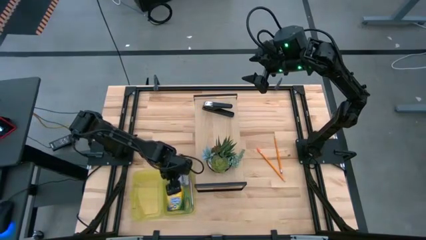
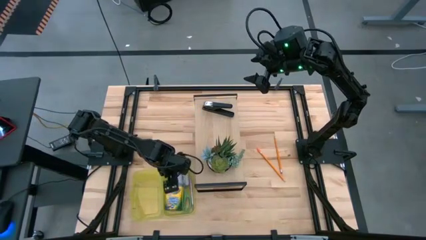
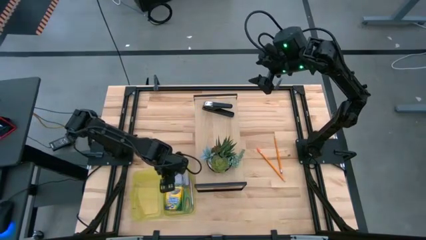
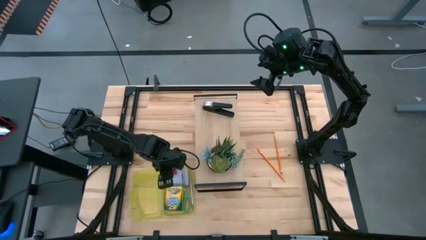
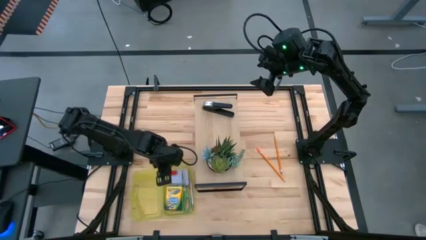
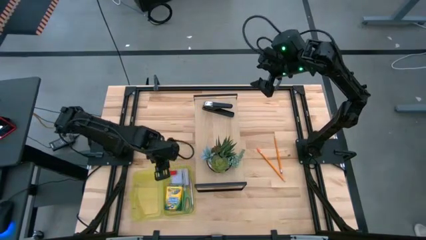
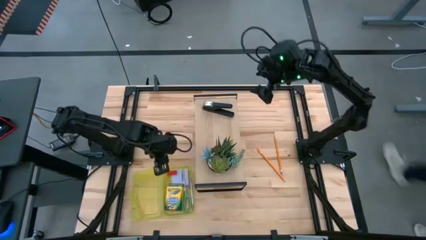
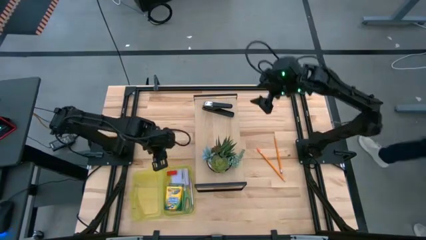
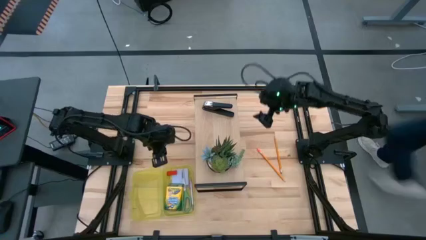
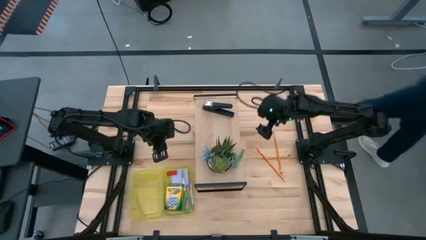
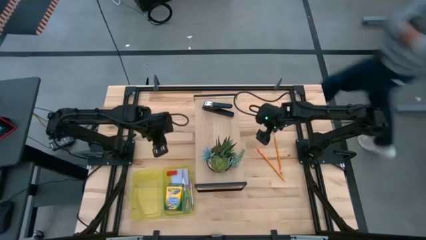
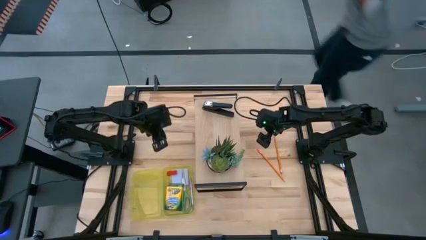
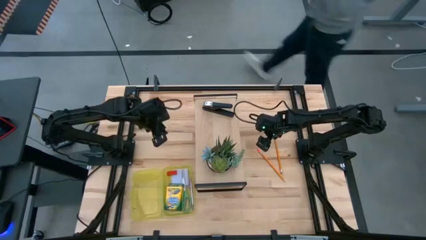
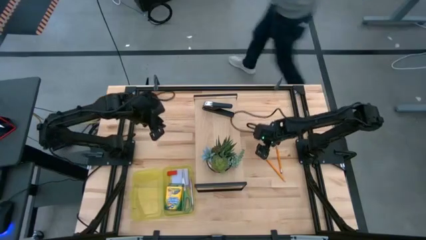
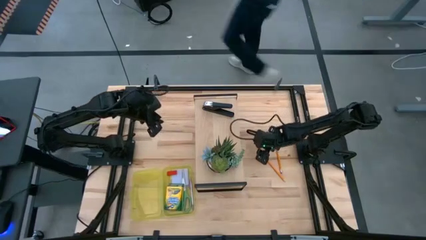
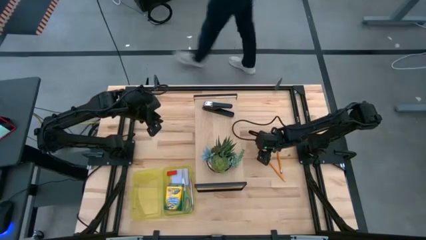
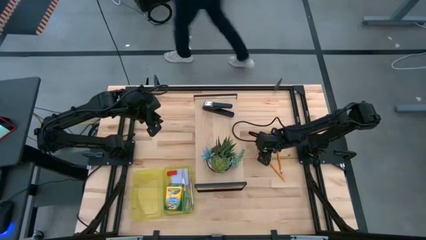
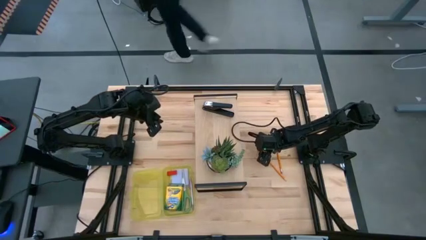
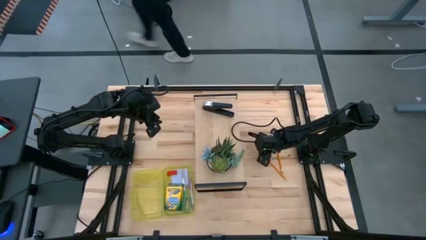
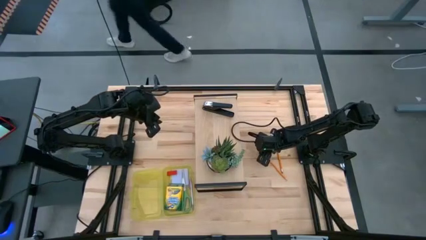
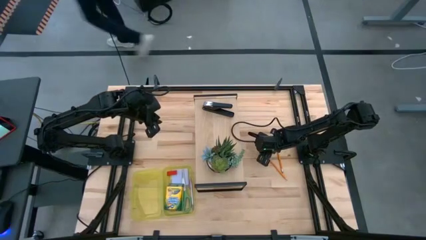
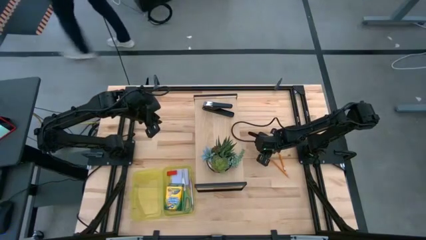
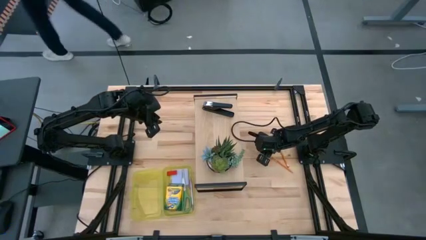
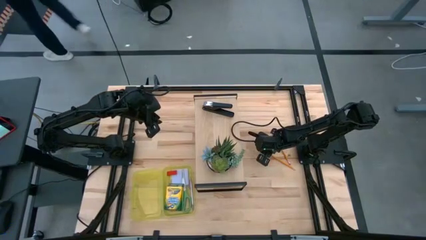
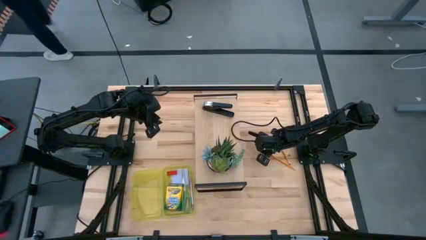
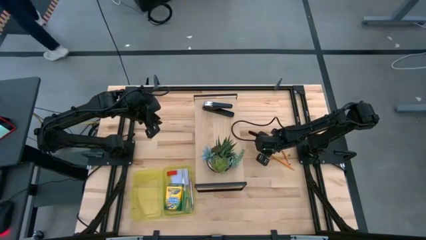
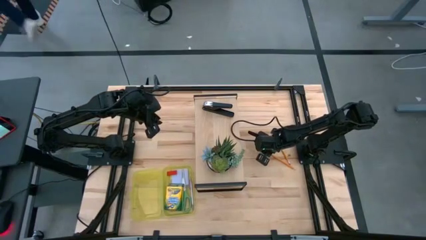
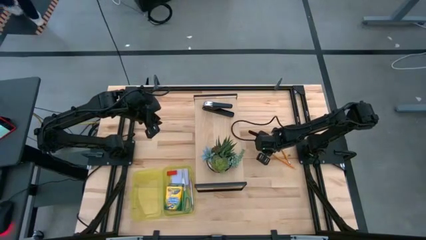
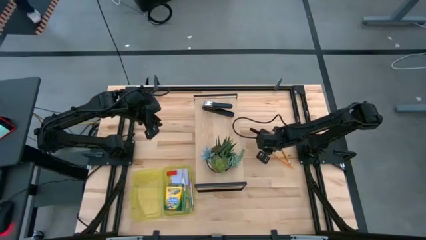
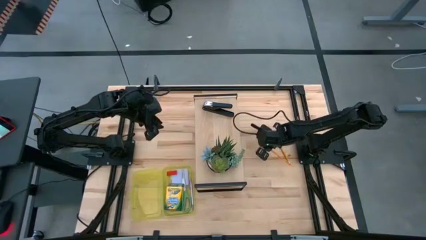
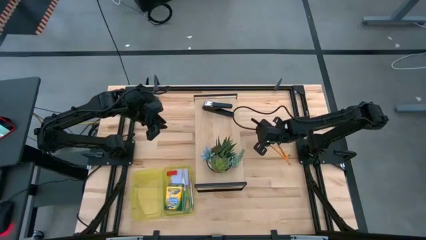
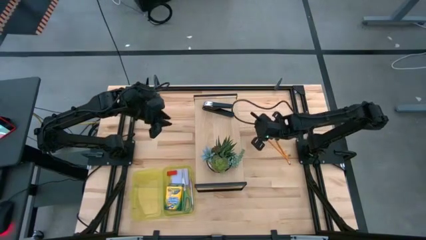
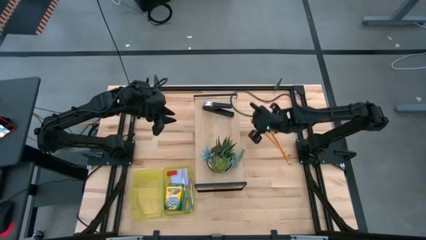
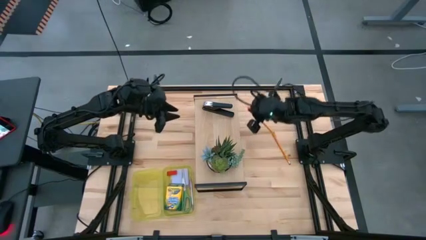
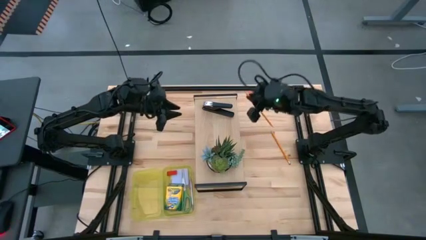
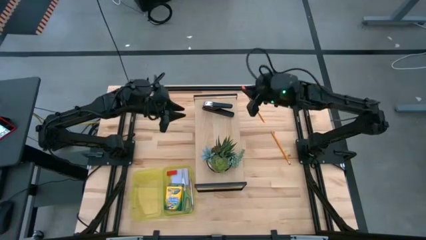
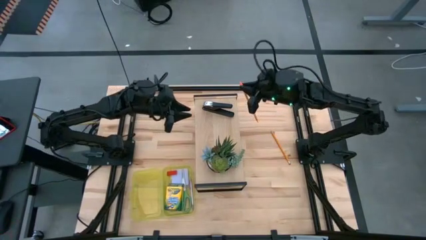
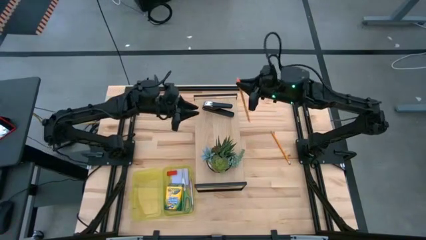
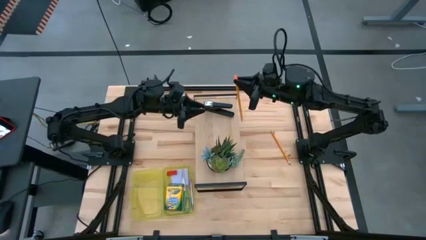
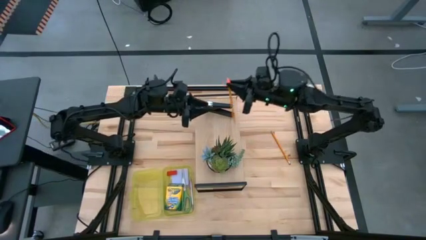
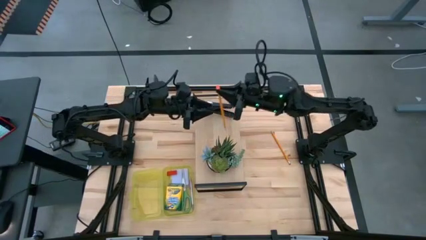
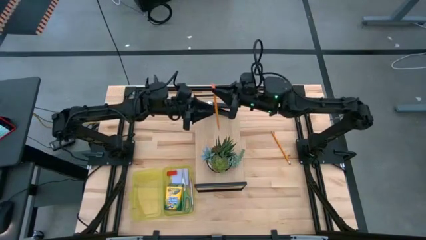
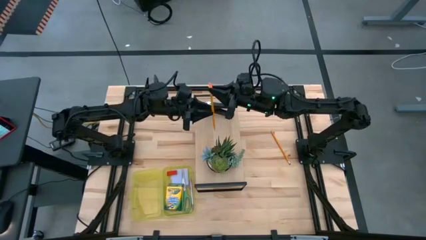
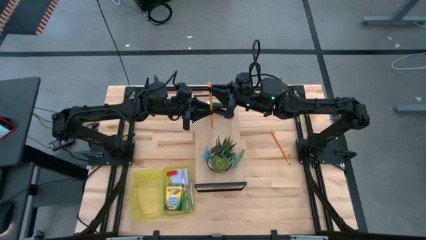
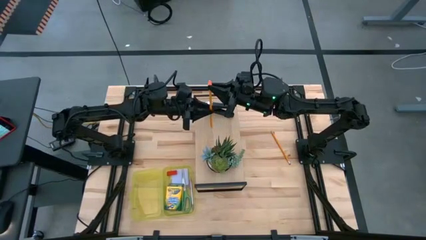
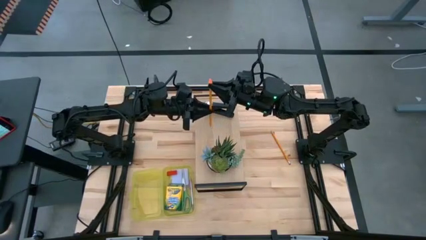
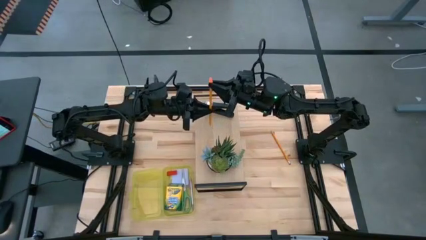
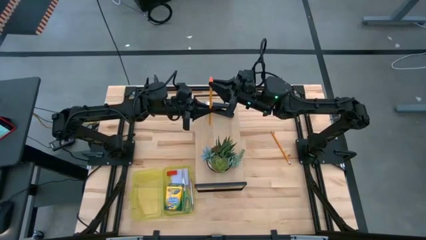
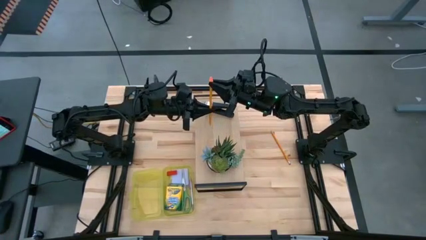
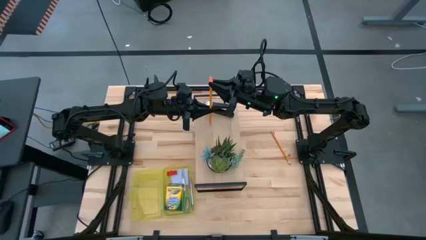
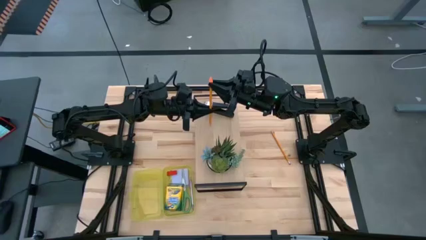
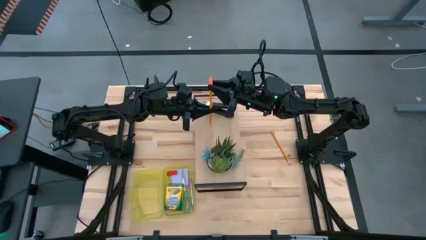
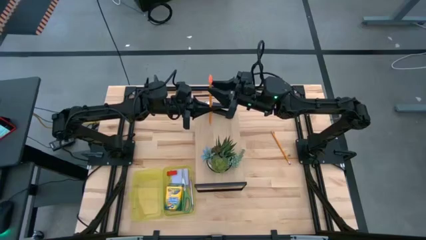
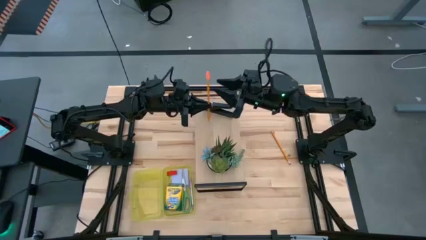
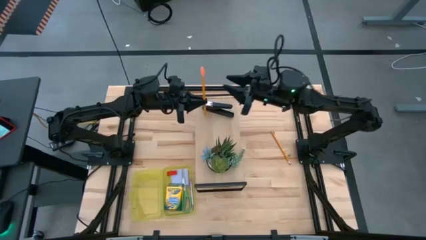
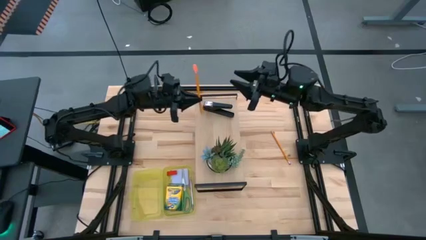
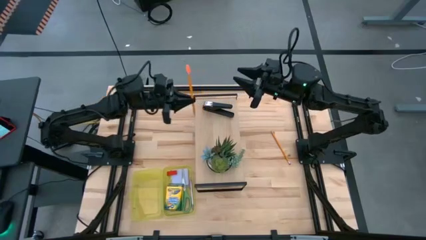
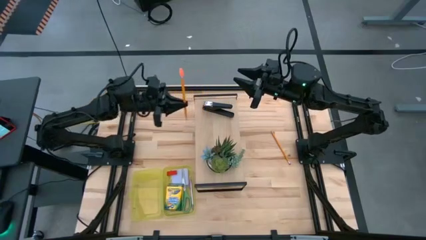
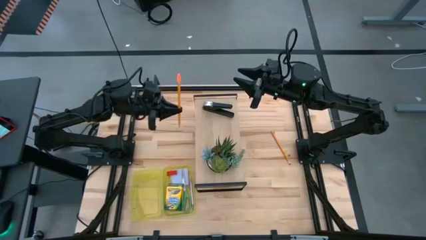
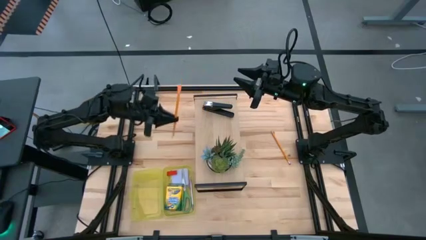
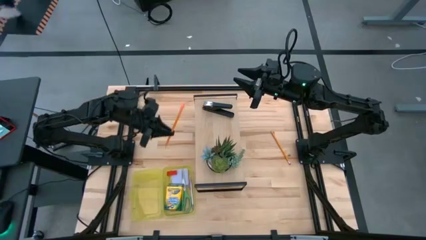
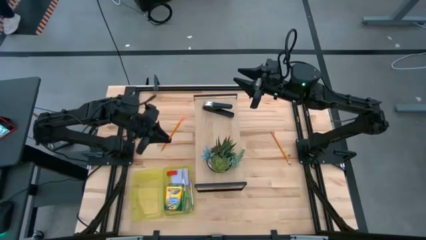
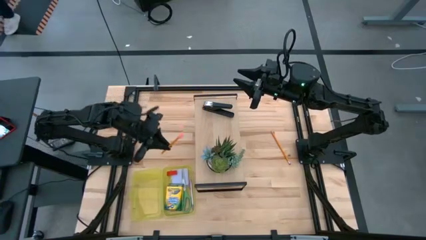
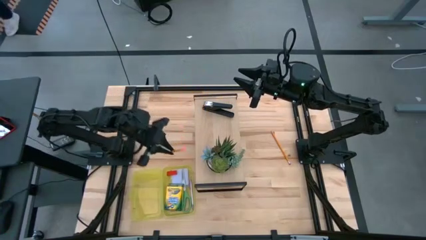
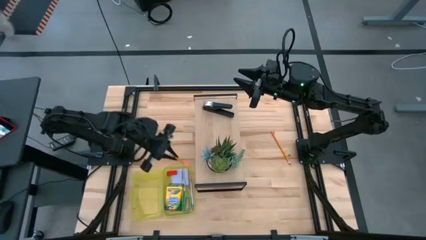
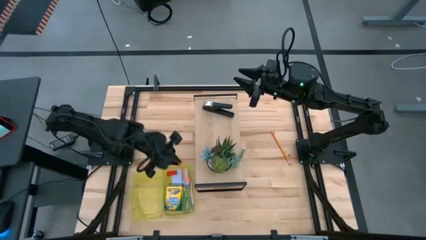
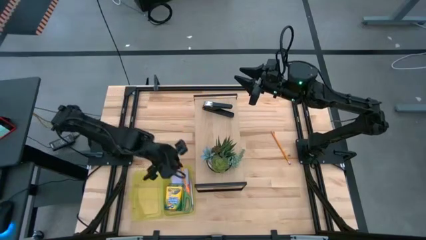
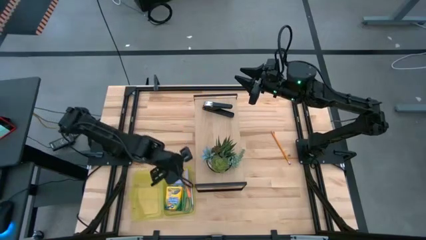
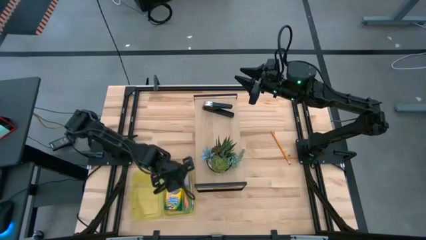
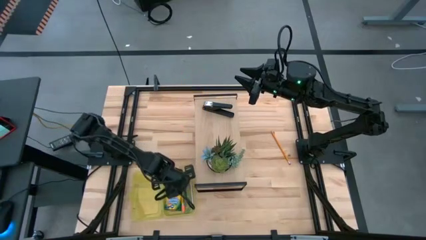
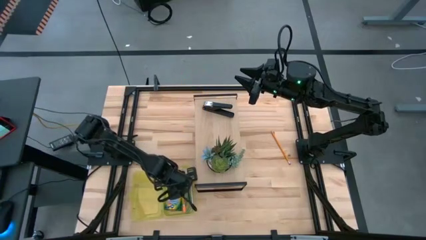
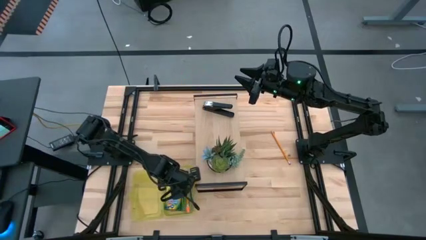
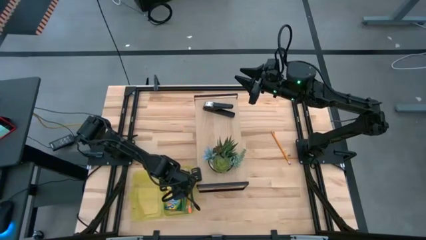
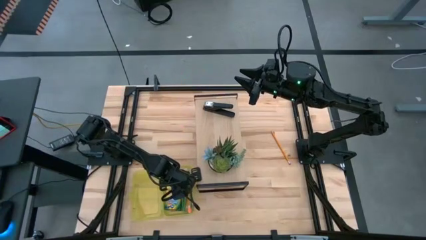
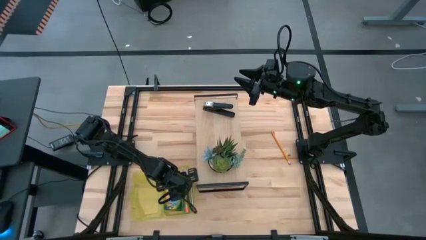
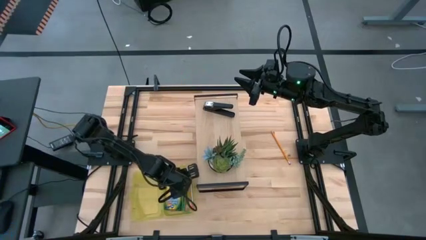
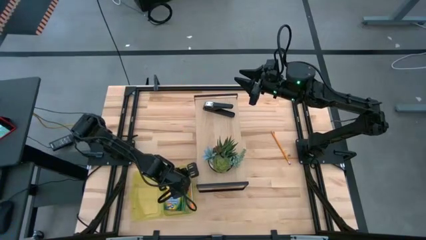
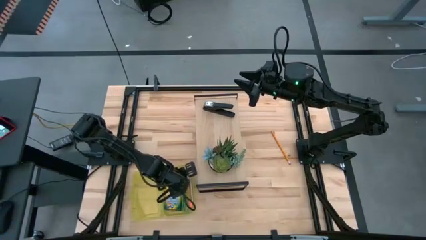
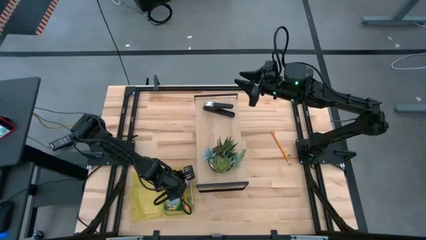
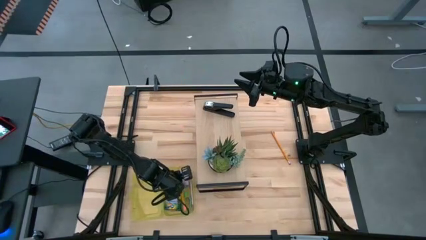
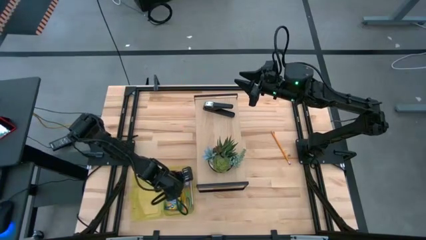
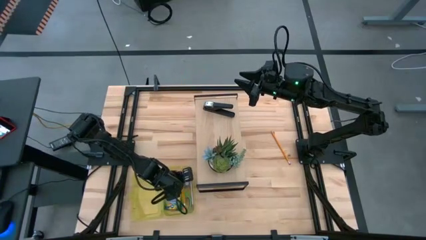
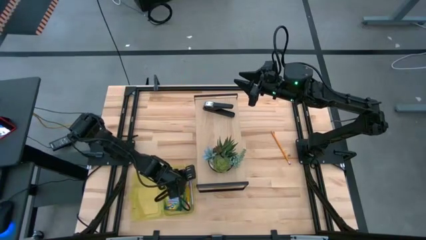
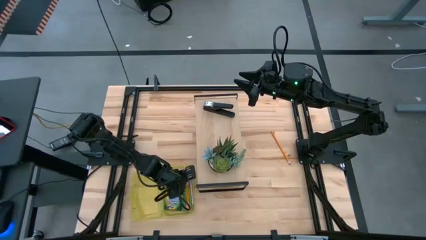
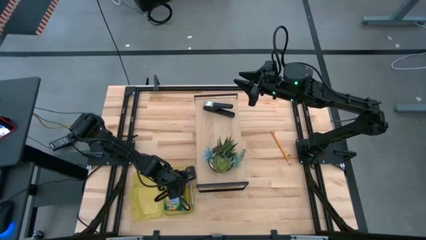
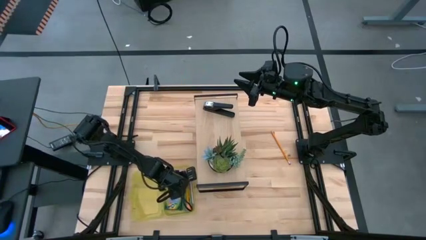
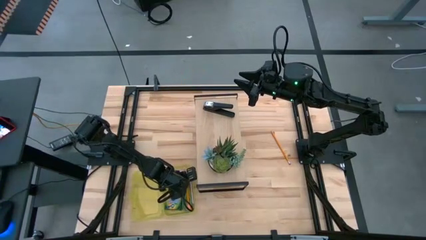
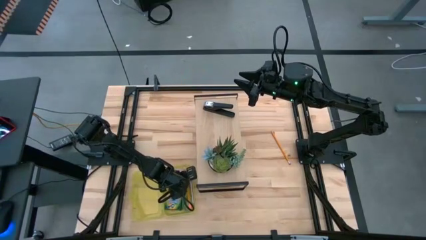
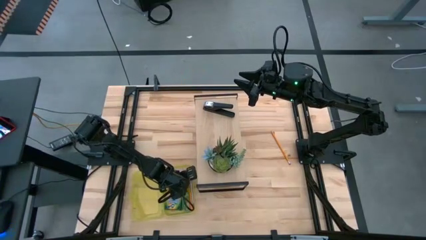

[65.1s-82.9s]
Task: Pack school essentials
Put the left yellow pencil into the yellow supply box
